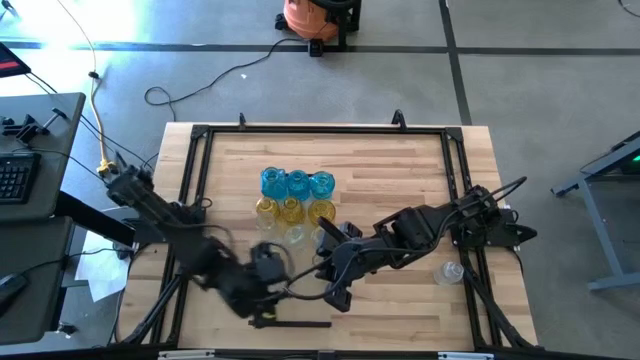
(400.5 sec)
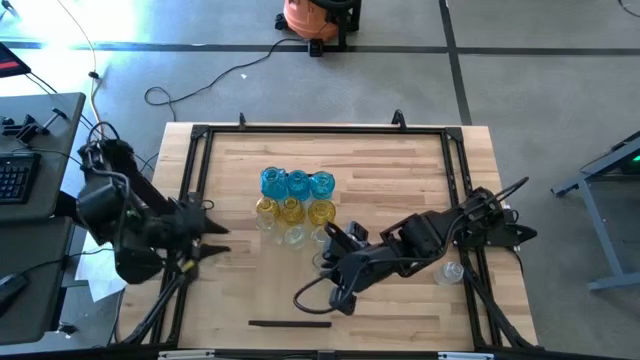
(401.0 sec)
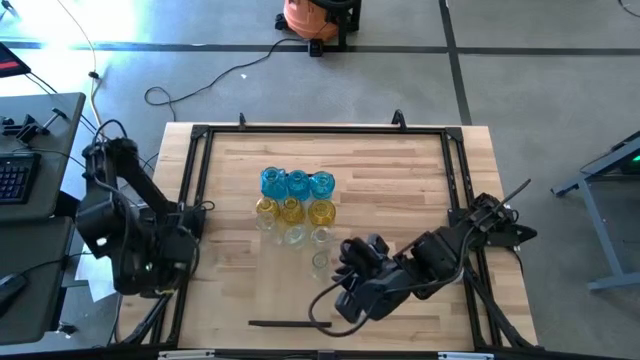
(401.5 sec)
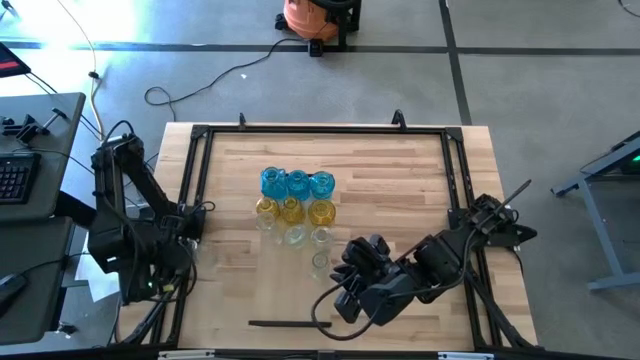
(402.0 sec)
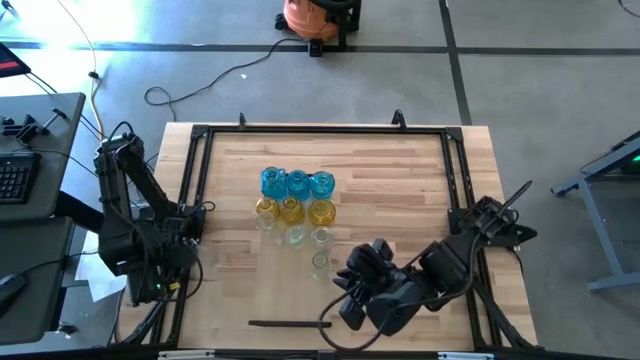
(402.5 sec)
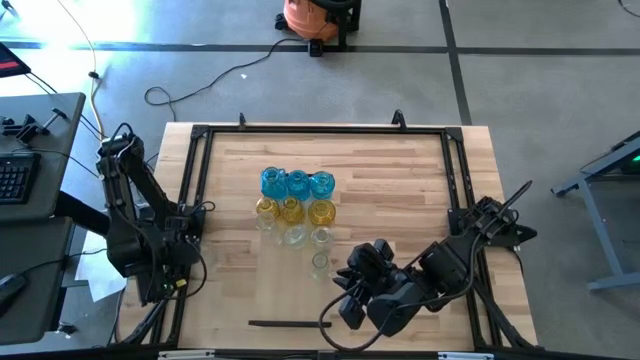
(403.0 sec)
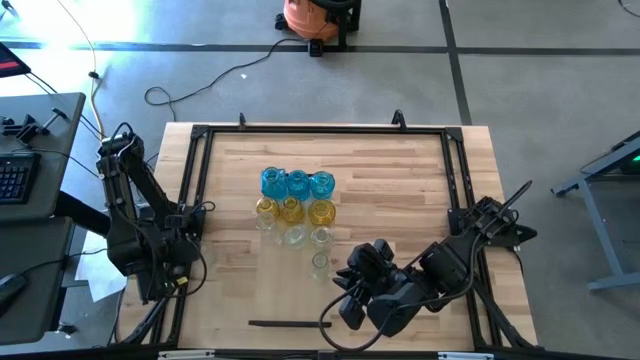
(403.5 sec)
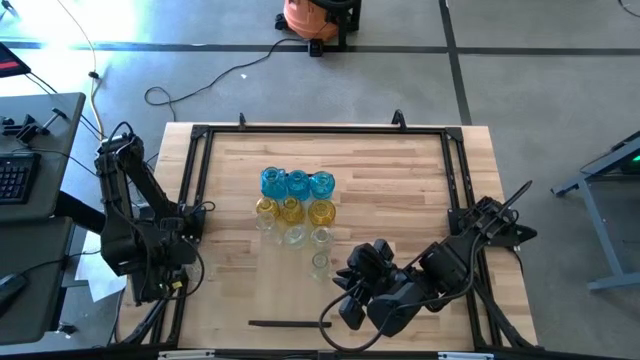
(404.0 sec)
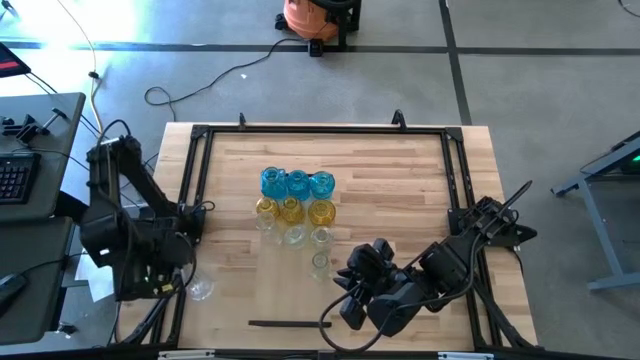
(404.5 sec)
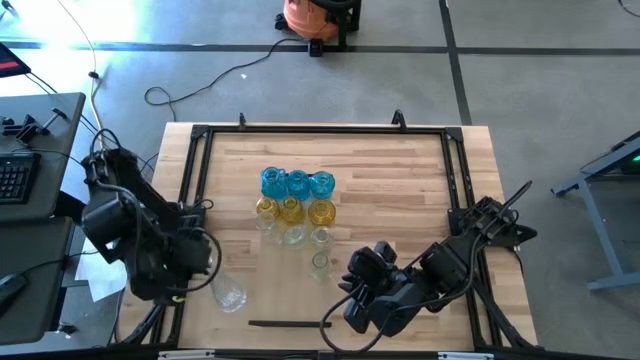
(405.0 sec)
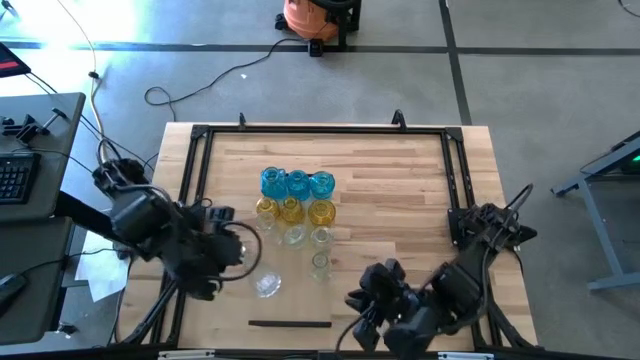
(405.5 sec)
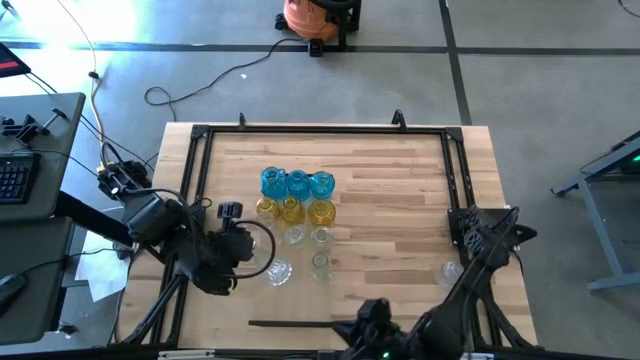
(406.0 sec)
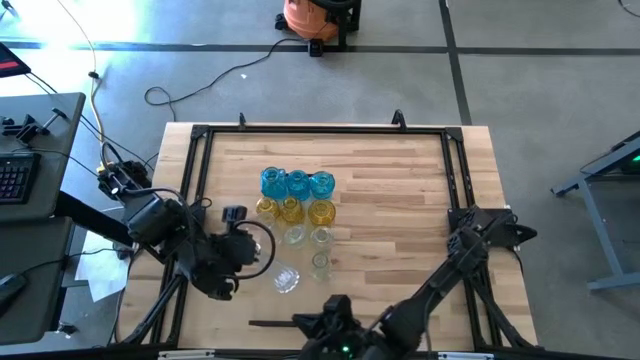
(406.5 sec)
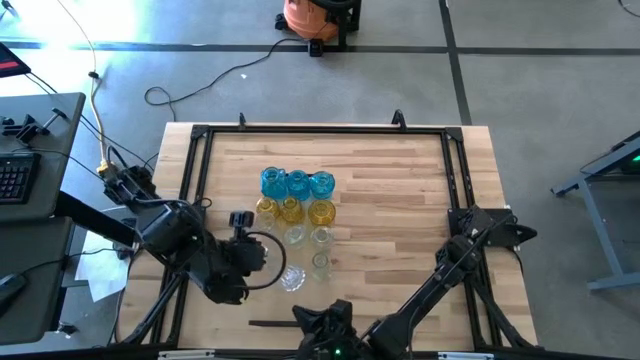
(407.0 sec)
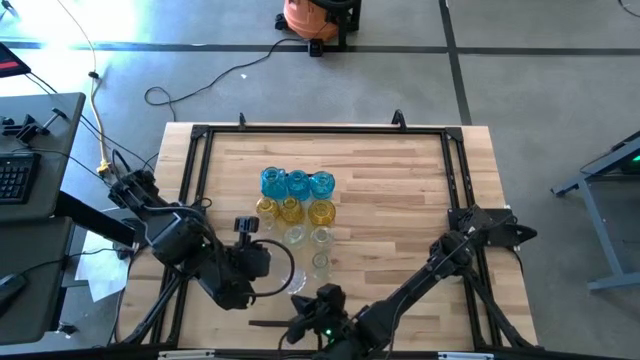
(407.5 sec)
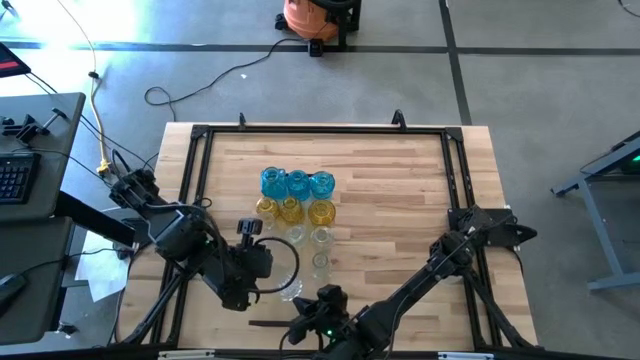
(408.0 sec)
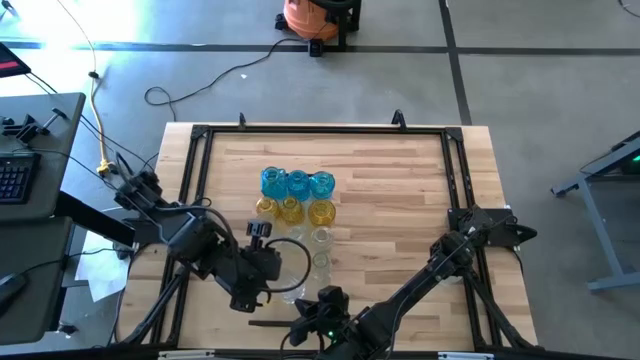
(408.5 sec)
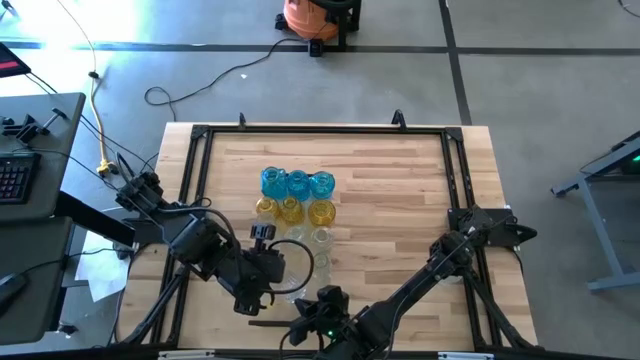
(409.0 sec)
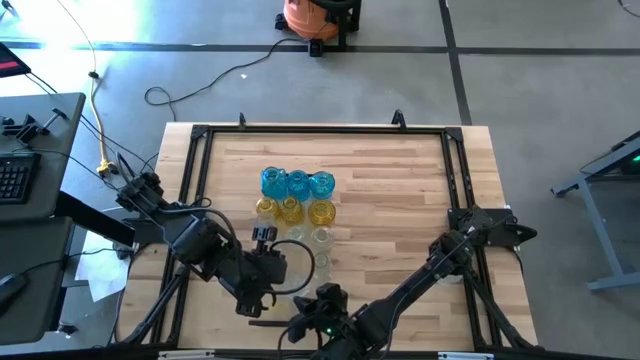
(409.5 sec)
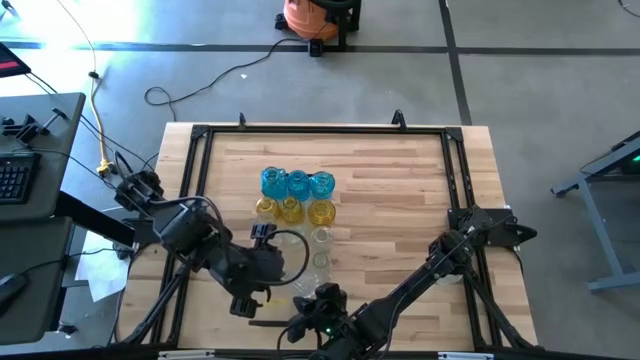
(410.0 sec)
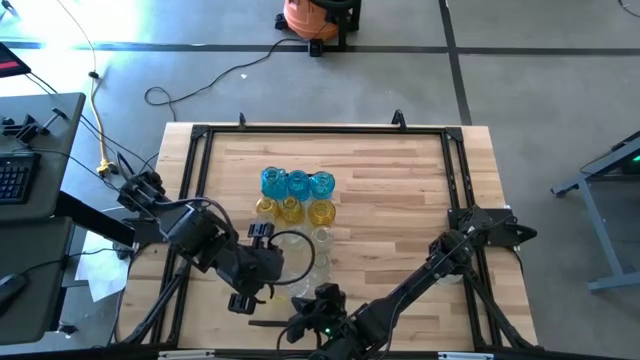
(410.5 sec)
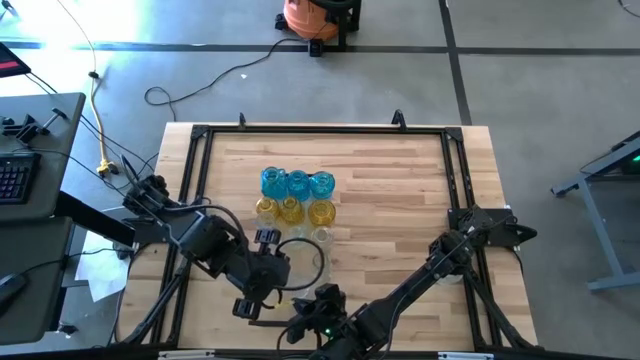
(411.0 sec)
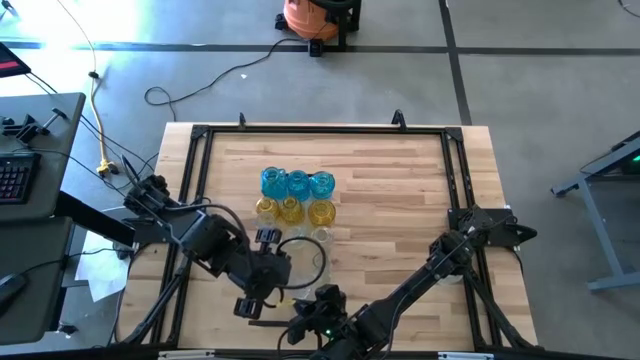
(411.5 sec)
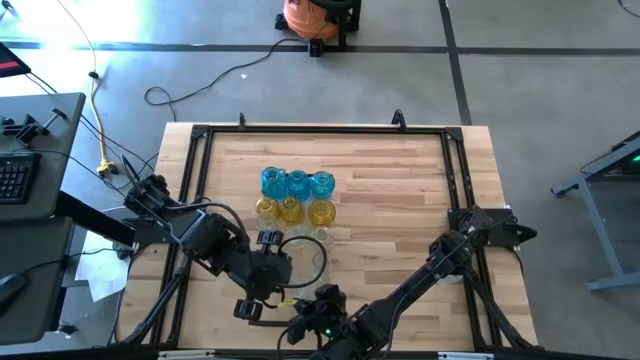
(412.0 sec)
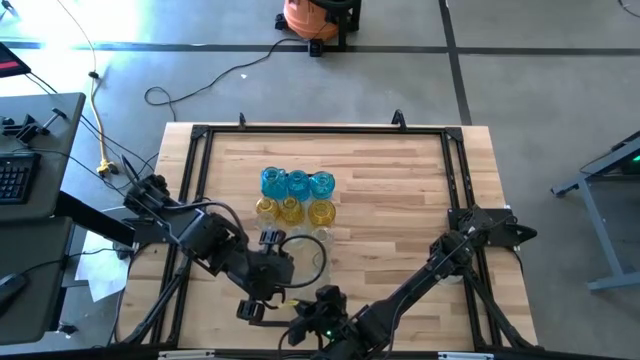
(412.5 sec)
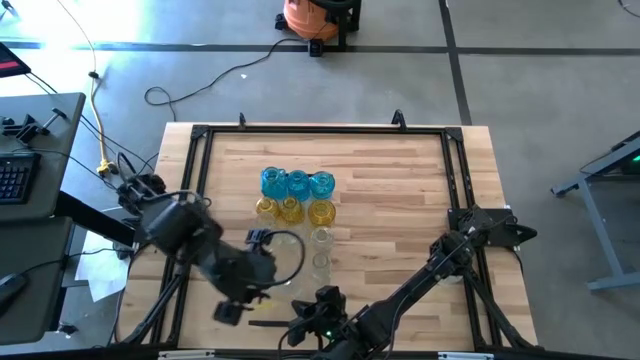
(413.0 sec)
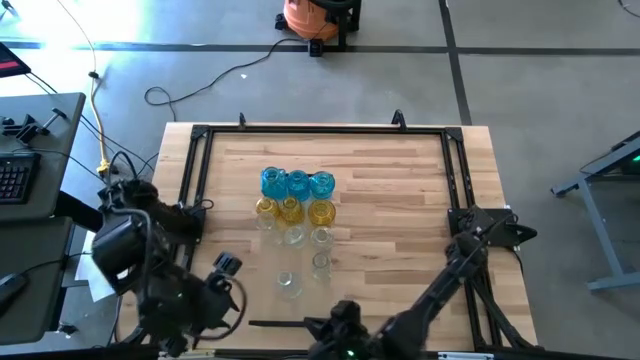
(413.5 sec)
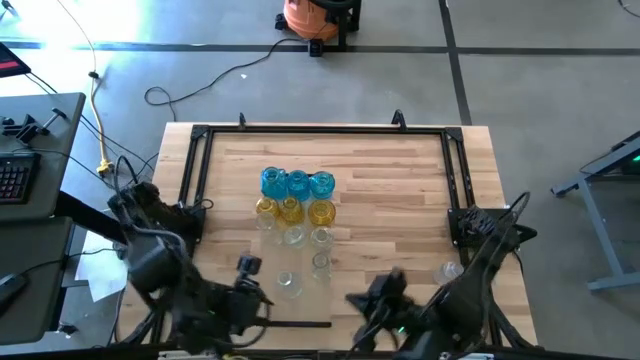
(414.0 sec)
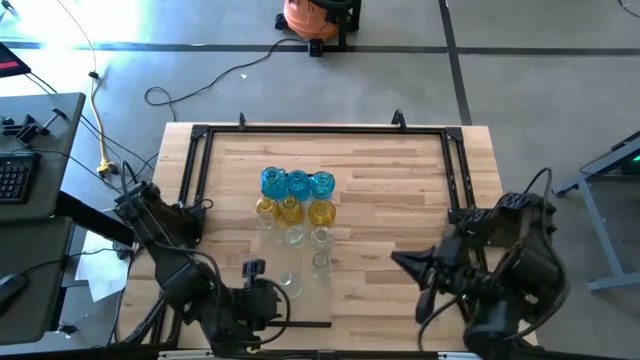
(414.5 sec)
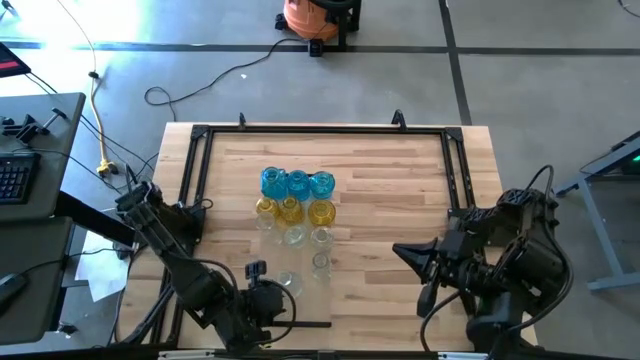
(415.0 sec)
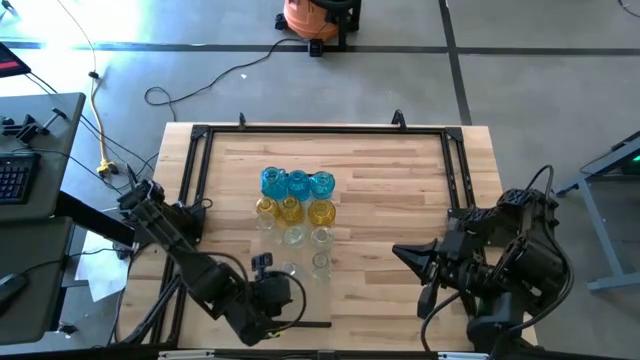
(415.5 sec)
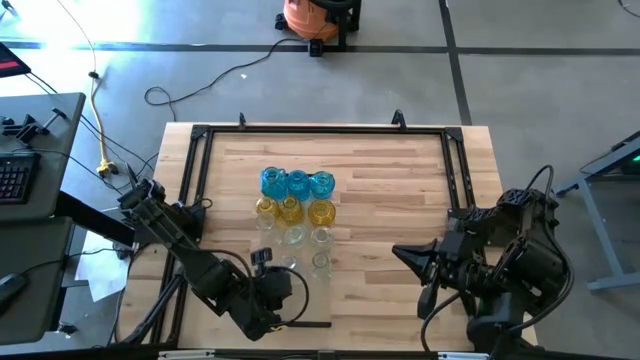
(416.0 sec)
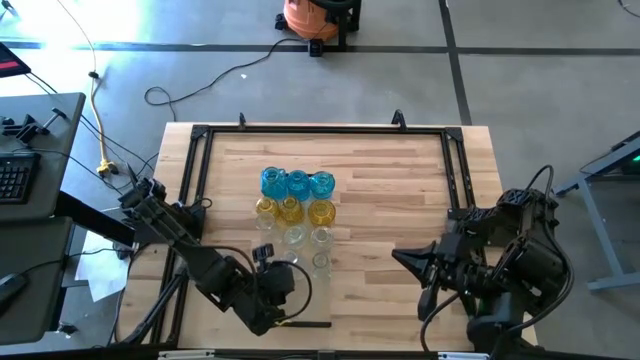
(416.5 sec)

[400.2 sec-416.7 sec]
Task: sort vases onto shelf
Put the left transparent vase on the shelf to align with the other transparent vases

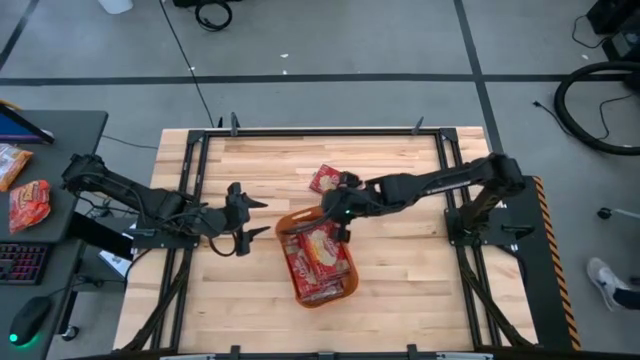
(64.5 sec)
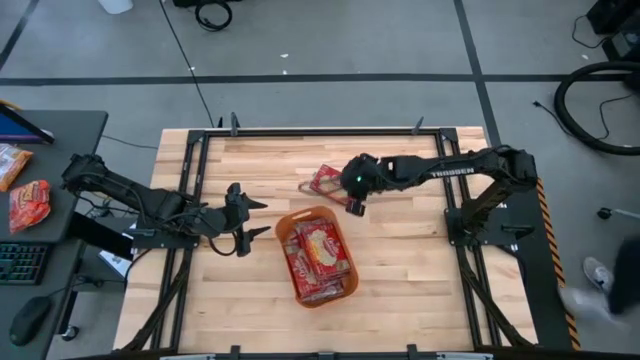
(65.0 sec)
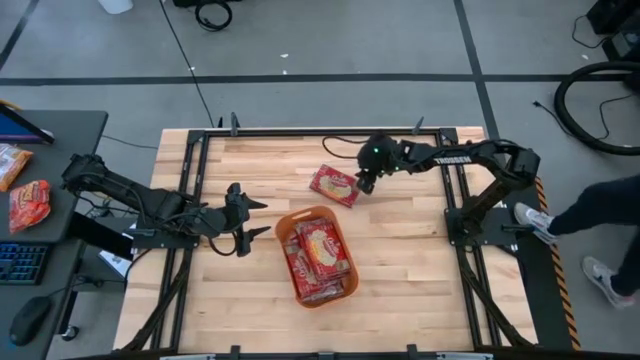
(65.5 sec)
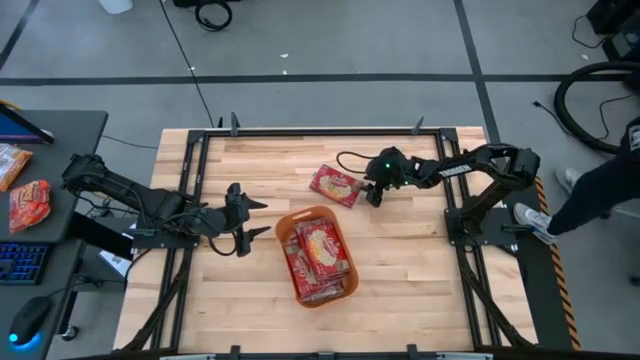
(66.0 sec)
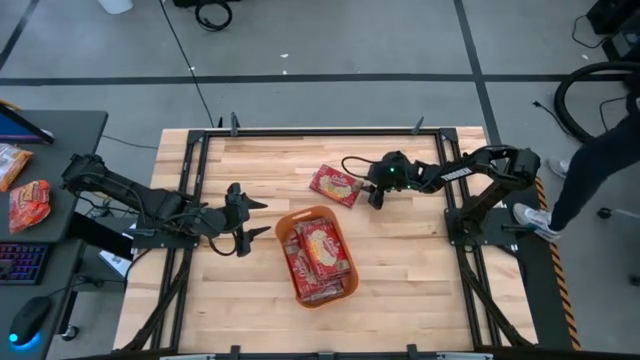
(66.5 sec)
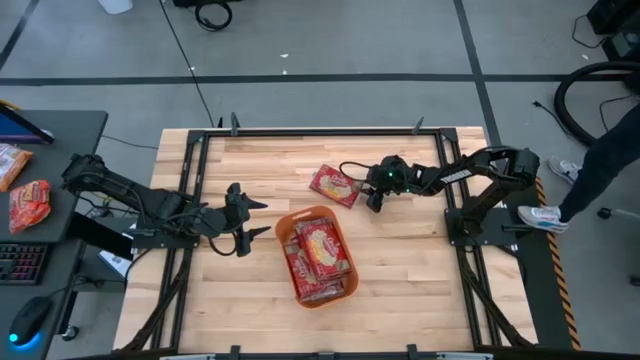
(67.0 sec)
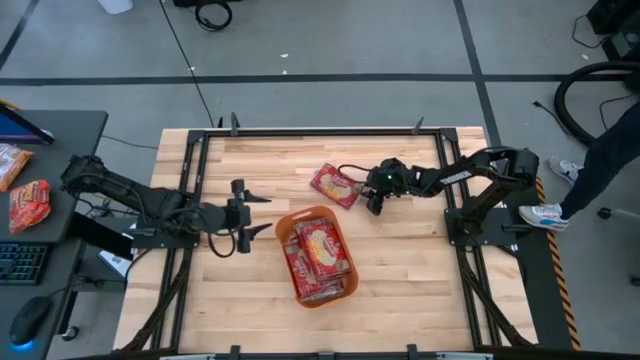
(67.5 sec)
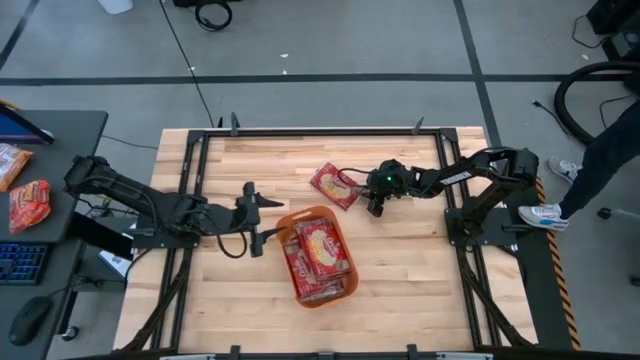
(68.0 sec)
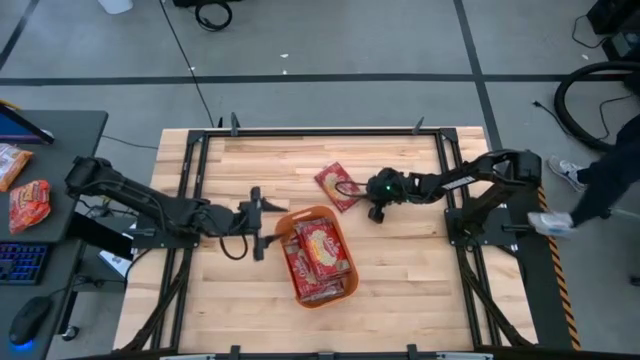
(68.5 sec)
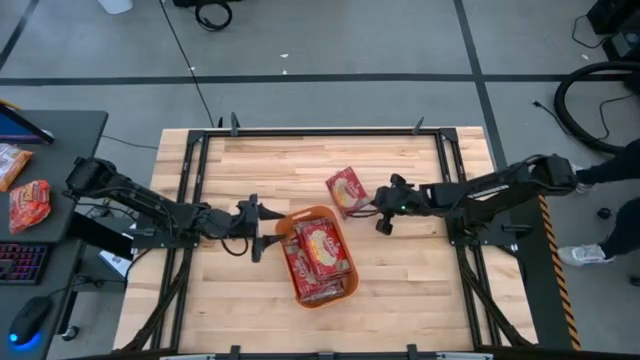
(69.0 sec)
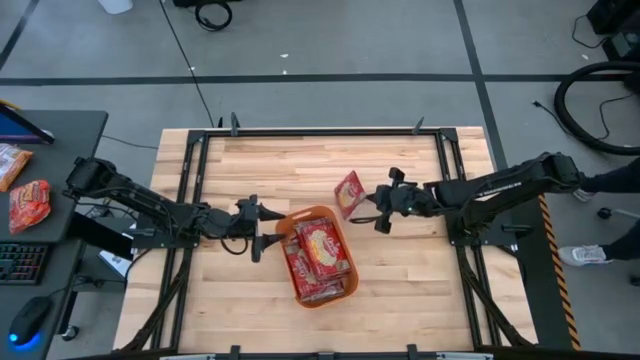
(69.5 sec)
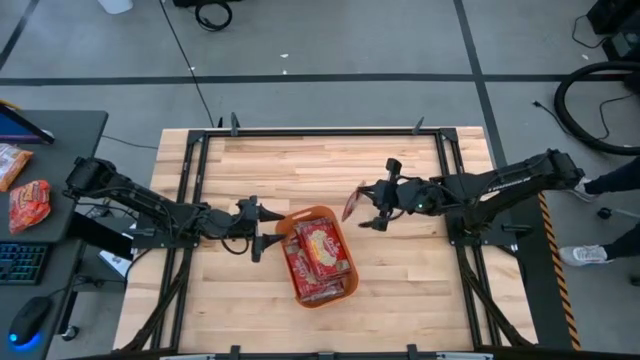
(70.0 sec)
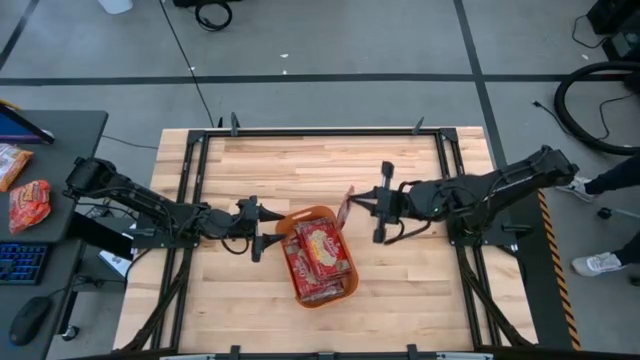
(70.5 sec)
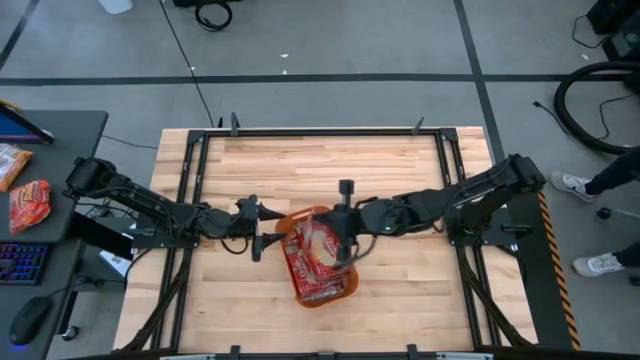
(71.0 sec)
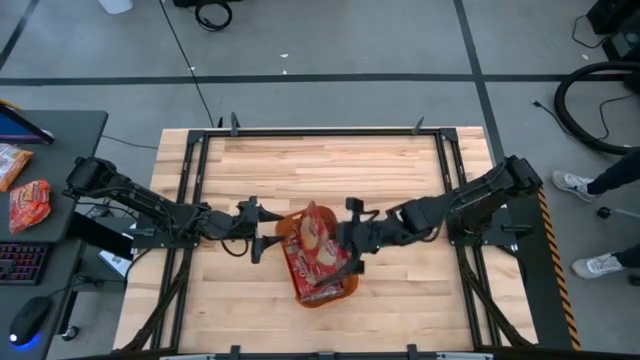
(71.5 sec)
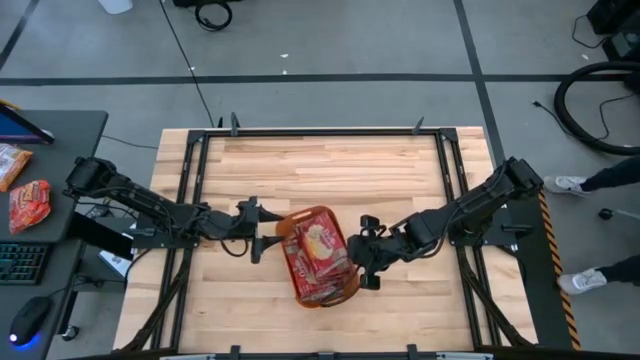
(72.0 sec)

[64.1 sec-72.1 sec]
Task: Sort popcorn bags into baskets
Put the red popcorn bag into the orange bin
